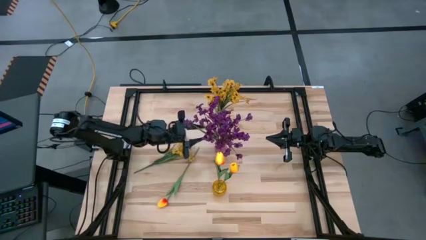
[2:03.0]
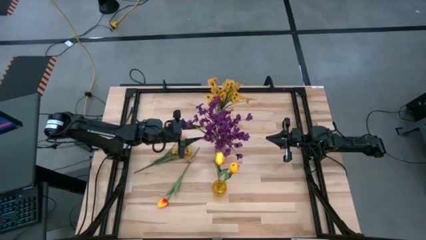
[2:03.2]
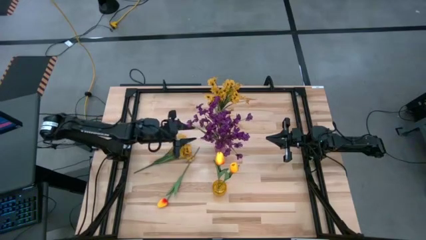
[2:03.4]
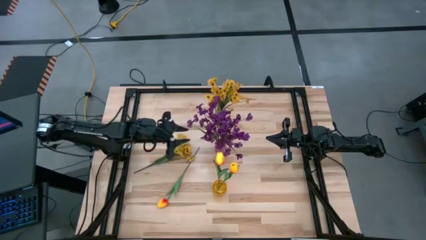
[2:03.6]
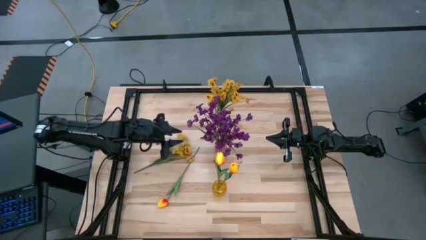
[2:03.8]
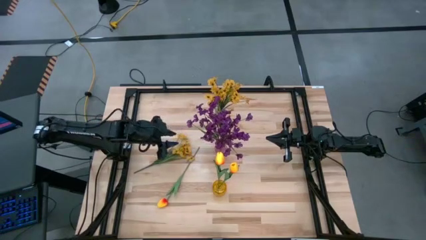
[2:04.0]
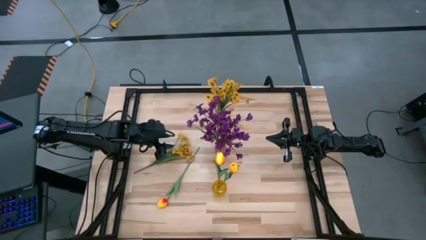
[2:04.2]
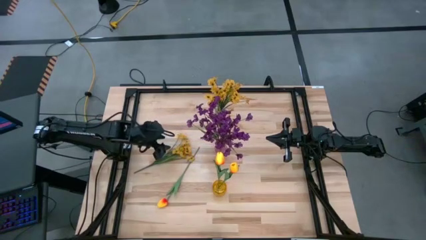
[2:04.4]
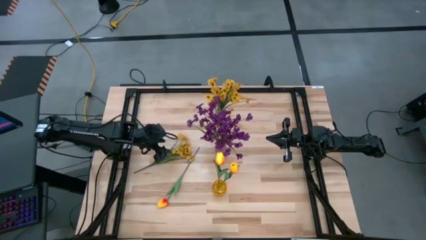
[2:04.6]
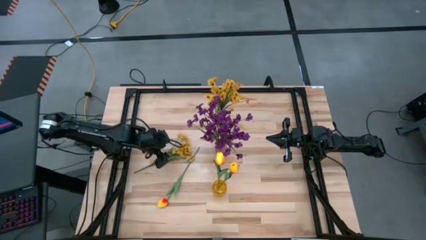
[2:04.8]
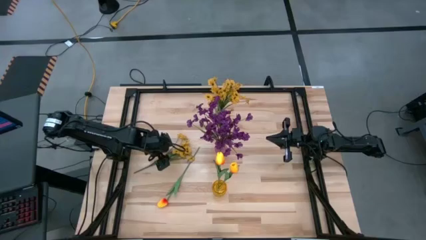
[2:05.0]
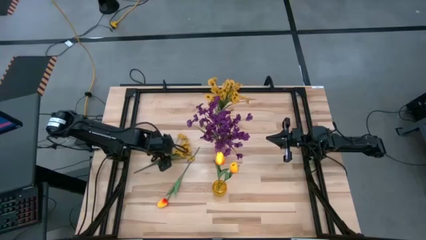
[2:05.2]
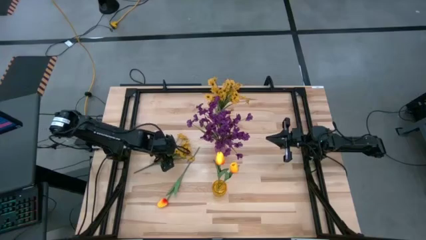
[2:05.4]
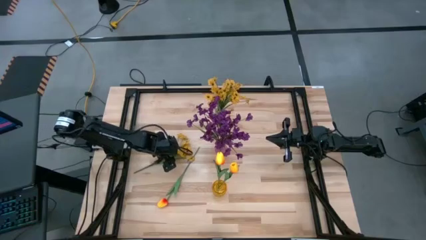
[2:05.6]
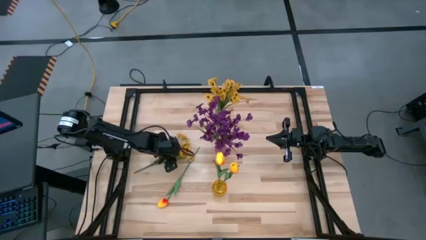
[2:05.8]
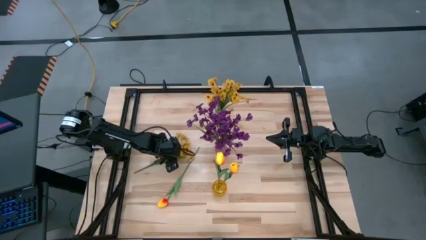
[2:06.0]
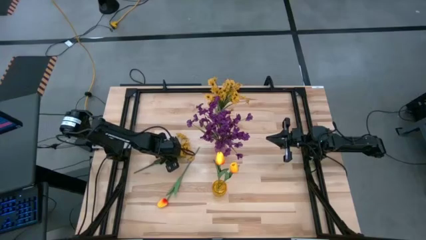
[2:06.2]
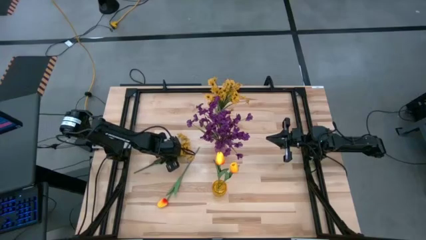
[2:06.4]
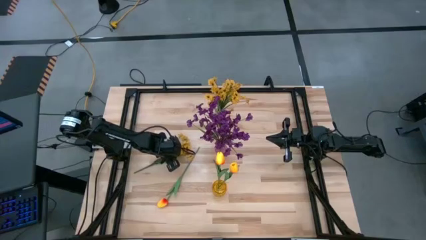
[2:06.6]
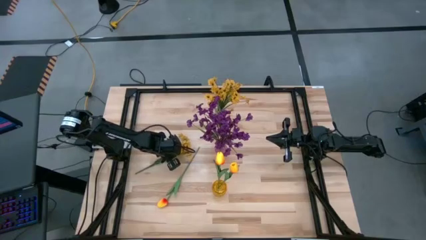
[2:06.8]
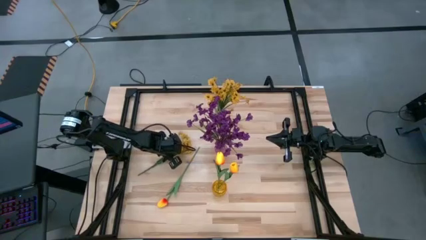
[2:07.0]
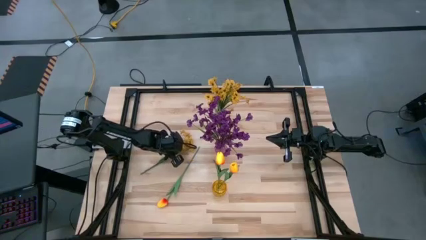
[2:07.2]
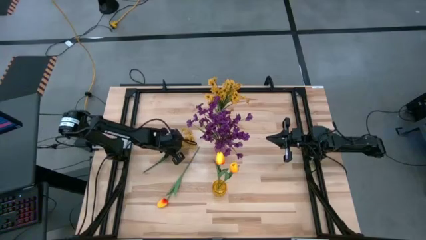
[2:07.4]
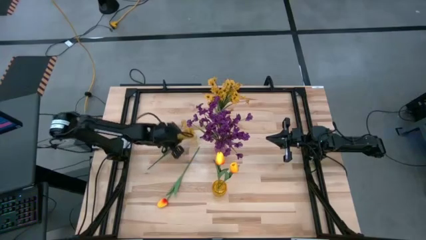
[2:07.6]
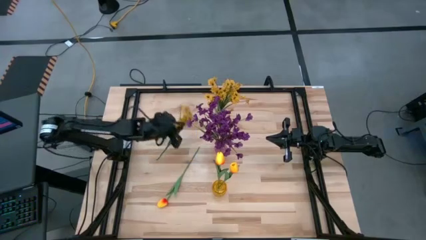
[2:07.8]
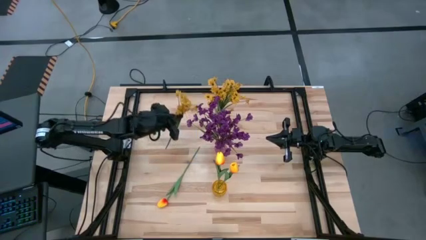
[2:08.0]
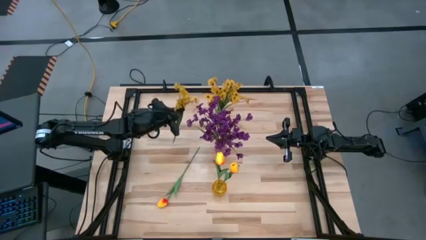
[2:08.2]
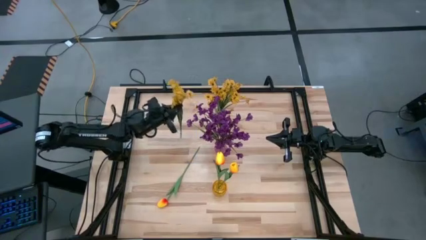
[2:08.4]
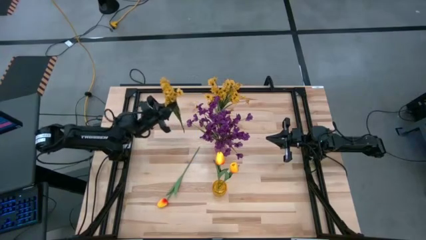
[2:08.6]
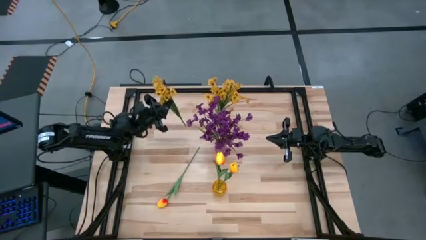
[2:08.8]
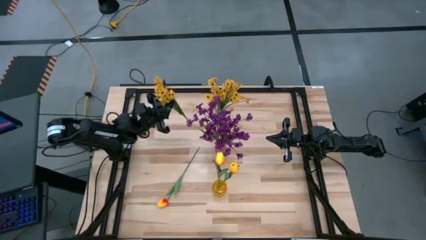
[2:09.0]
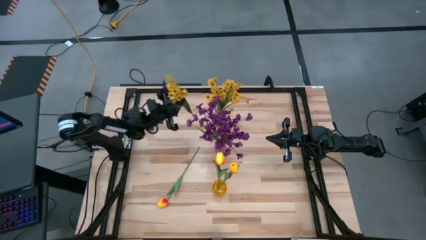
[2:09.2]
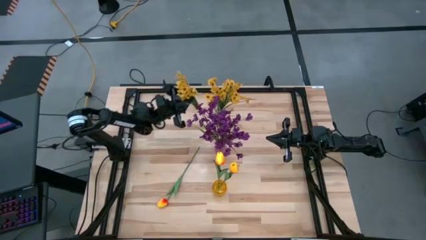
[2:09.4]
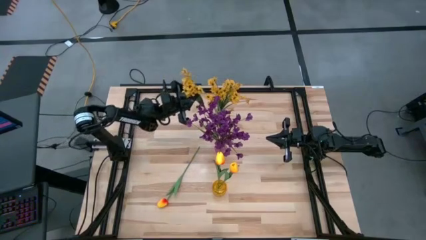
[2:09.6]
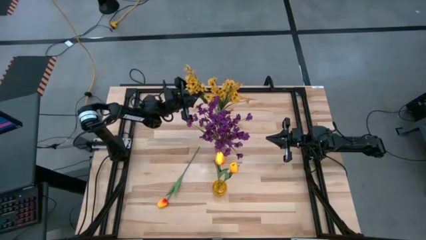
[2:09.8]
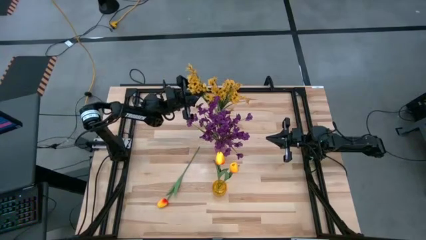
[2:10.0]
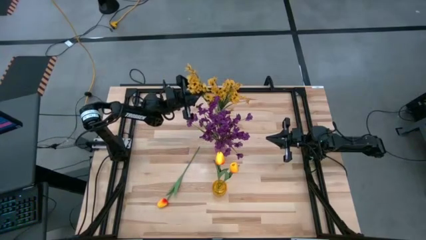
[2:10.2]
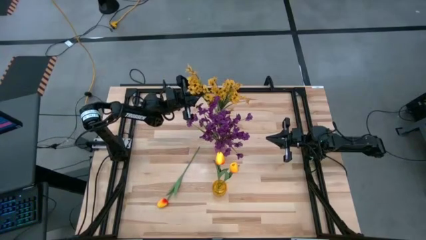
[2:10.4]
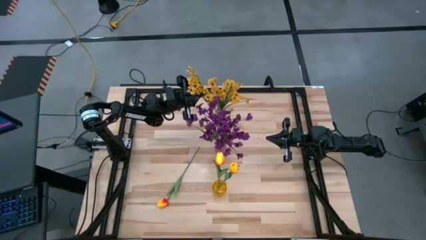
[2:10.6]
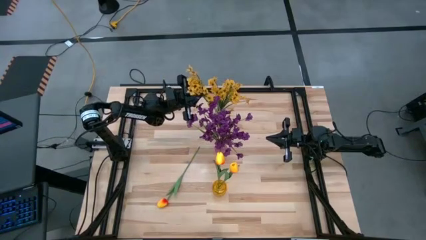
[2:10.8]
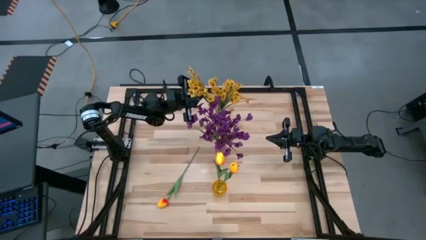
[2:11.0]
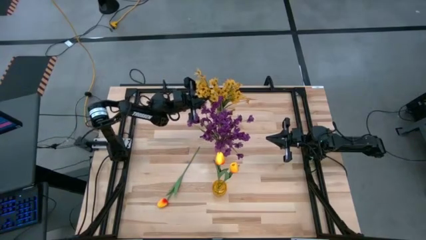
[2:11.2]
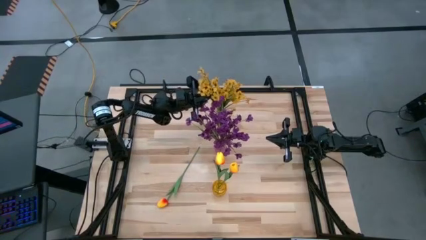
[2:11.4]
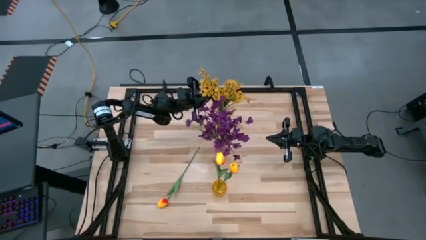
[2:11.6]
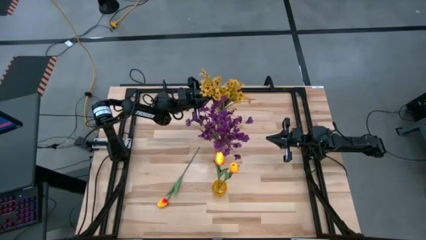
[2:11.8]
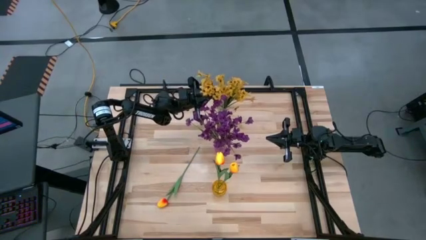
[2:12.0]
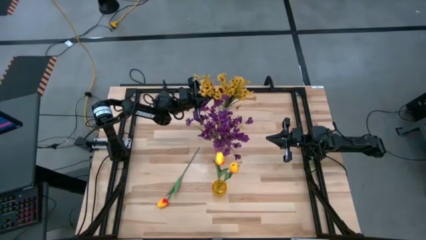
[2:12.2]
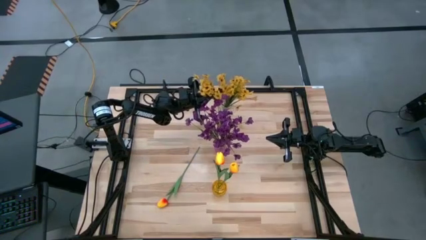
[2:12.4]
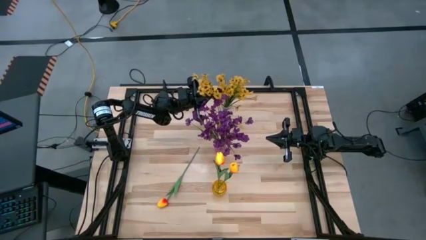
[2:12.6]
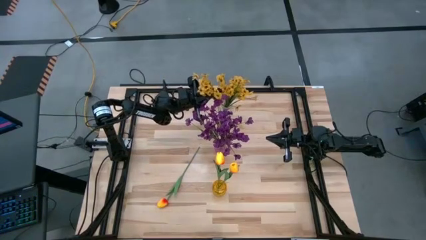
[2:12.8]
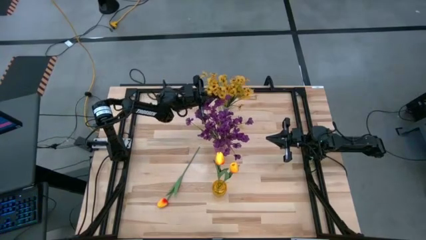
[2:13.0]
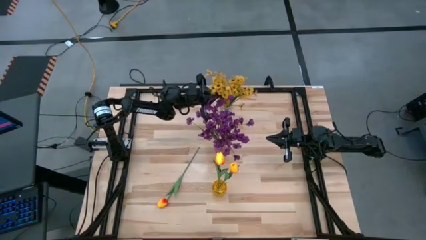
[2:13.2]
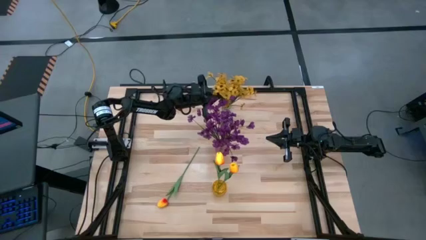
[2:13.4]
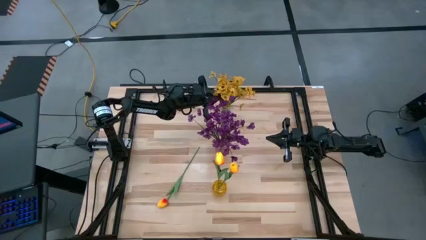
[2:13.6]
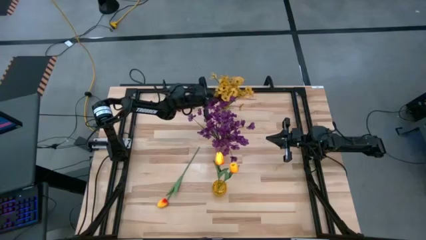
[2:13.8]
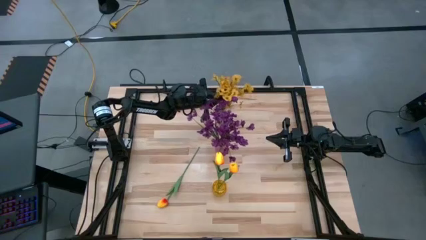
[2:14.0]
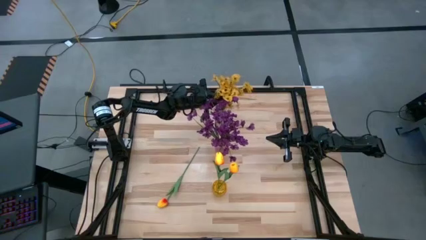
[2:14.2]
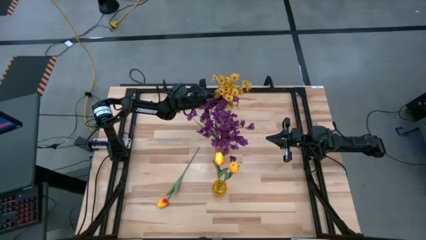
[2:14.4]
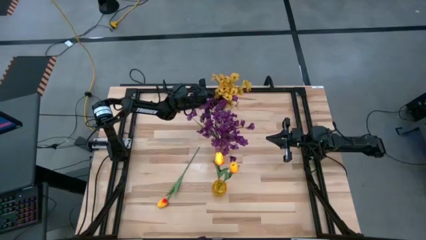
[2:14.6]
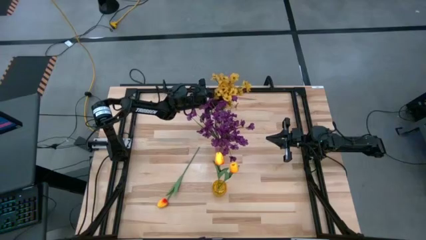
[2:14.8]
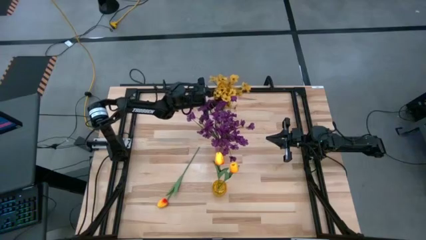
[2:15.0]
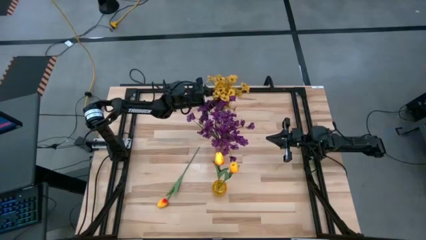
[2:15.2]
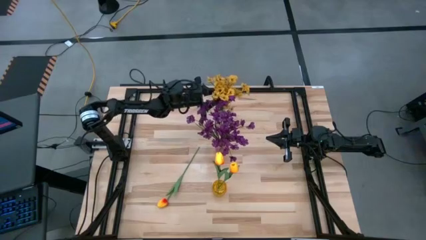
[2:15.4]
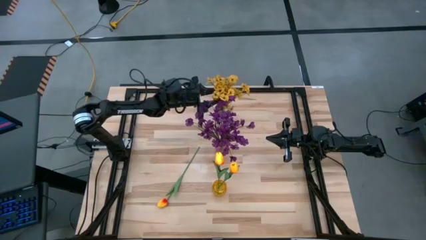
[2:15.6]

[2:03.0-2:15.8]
Task: Sort flowers into vase by color
Put the yellow flowers into the transparent vase
